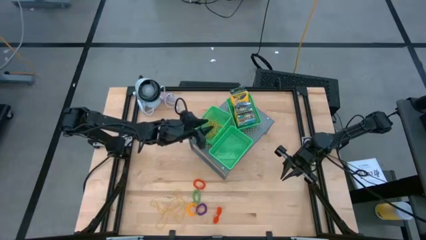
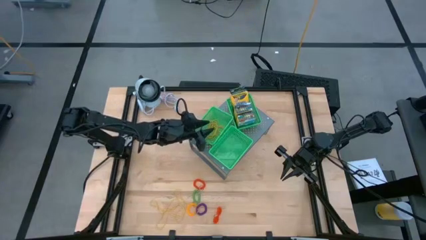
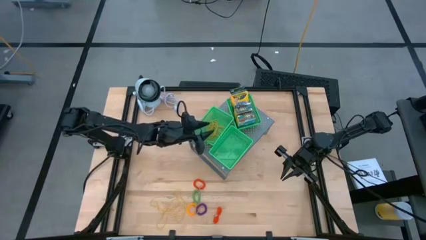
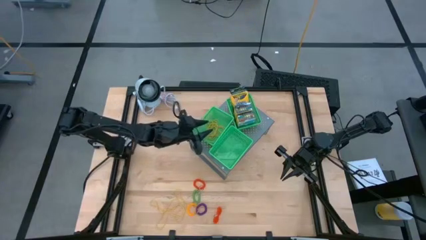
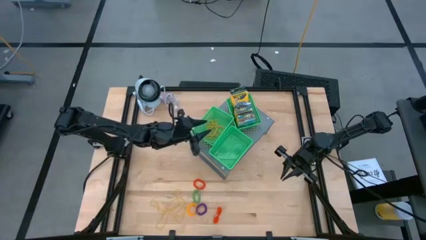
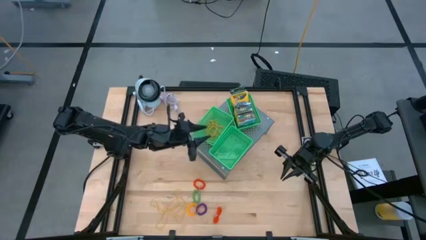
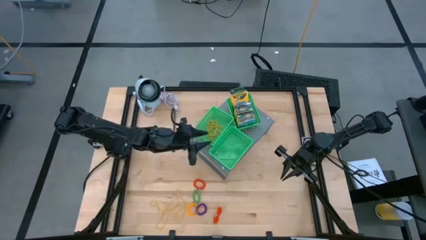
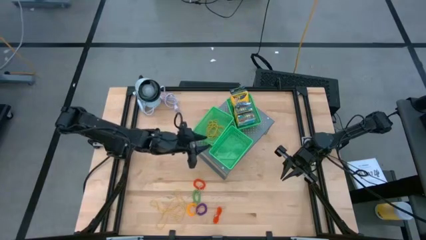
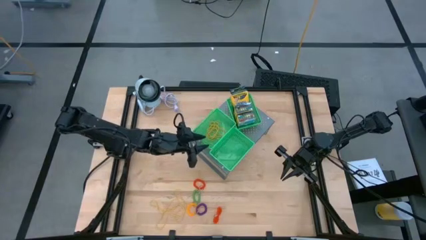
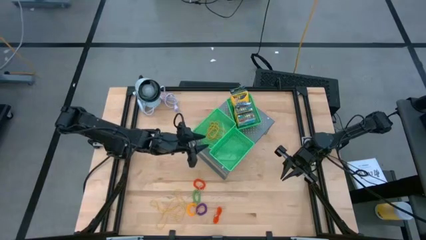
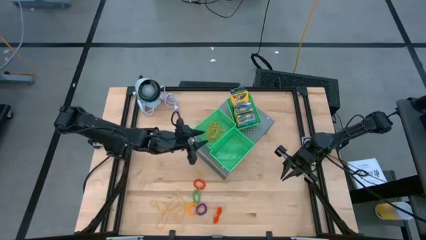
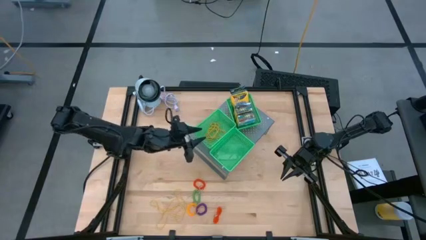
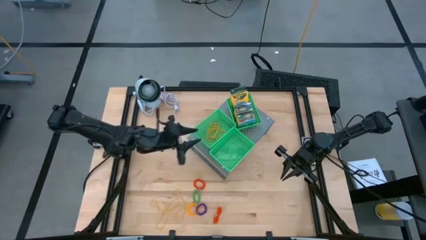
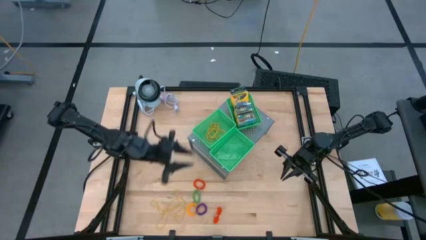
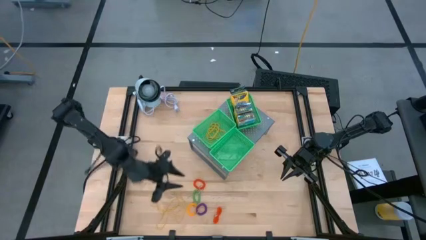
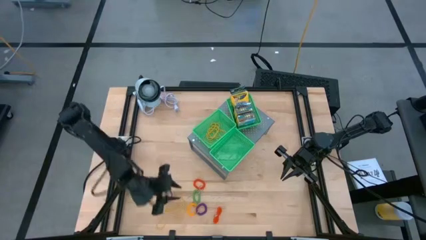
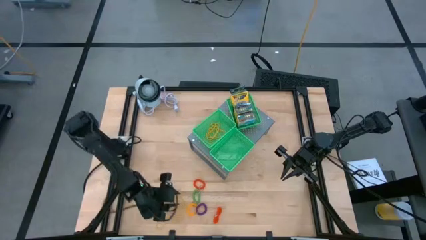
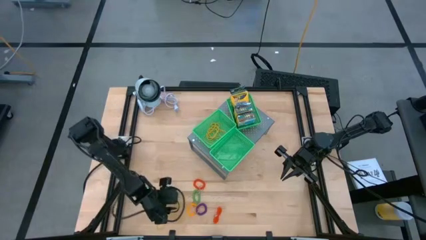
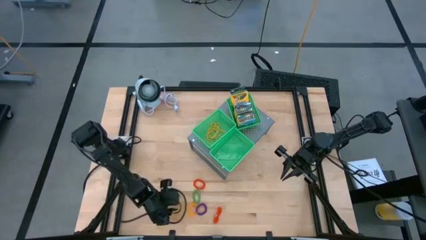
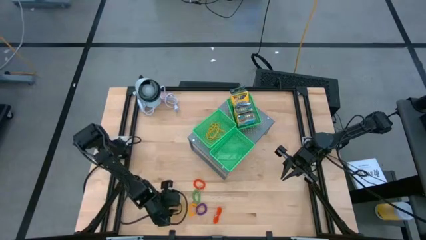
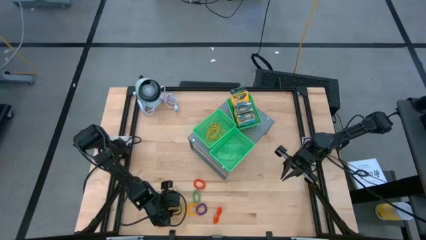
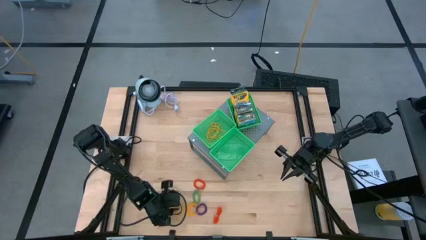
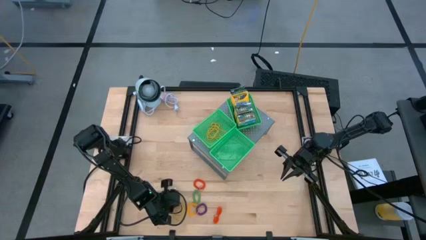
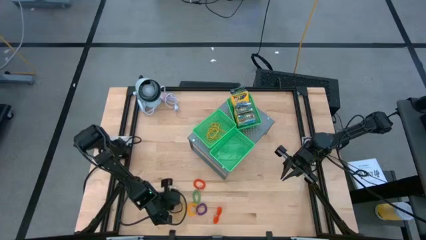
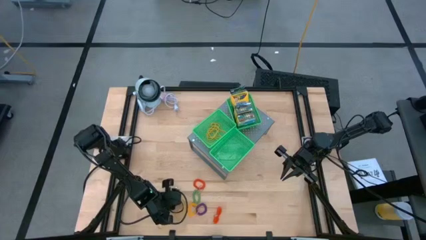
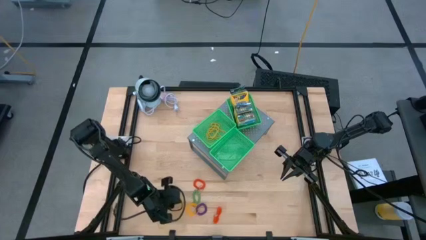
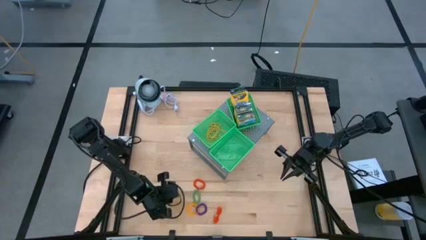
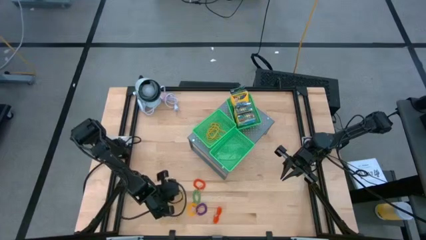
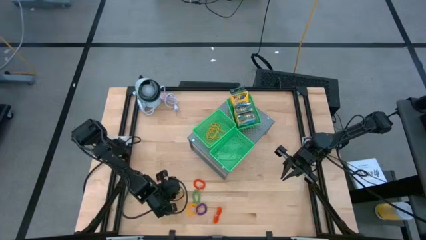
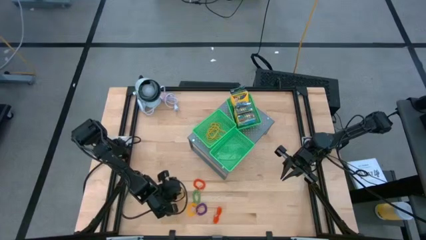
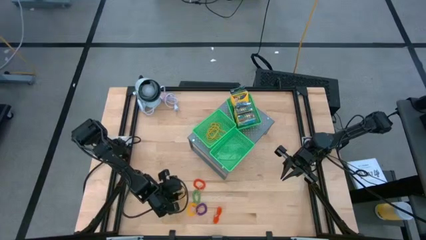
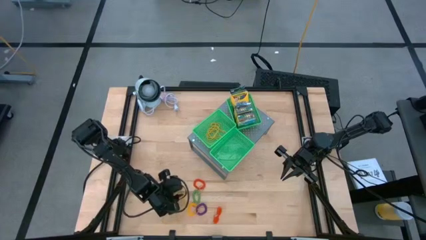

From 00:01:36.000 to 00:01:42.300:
Task: Pick & Place Office Desk Supplies
Put the yellow rubber band into the top left green bin on the shelf

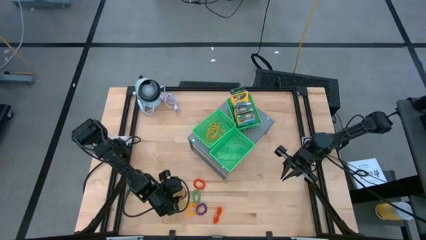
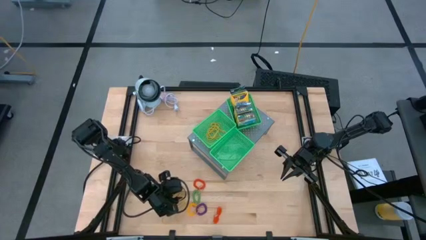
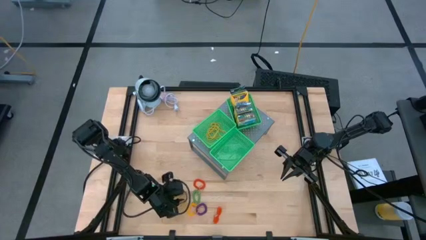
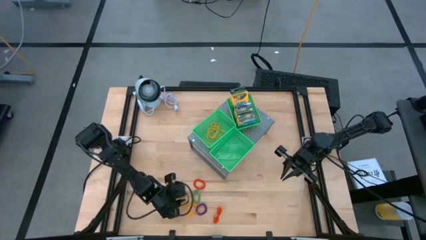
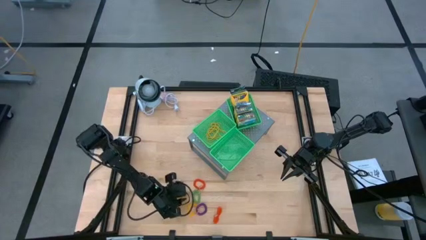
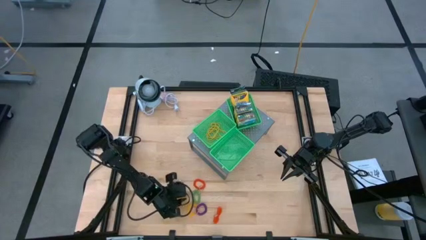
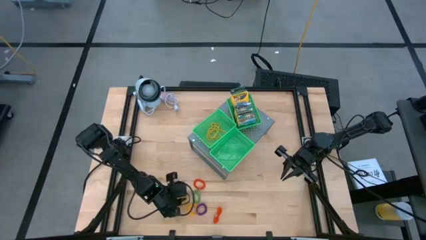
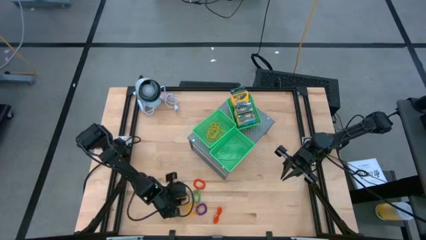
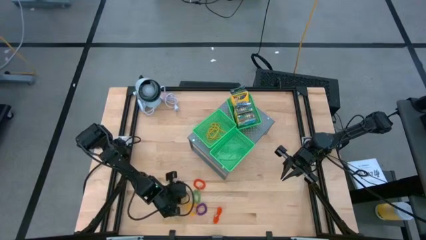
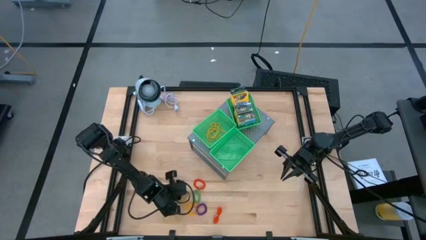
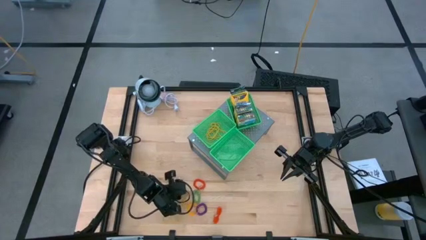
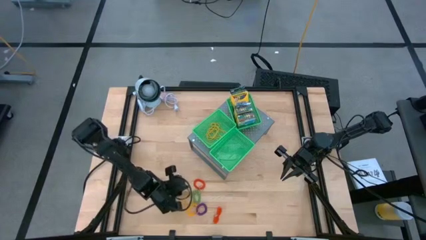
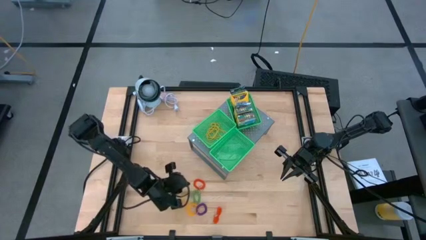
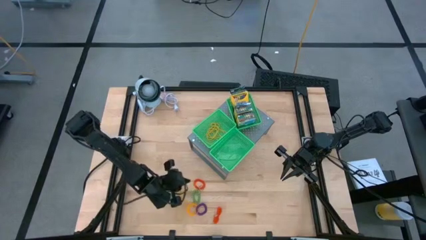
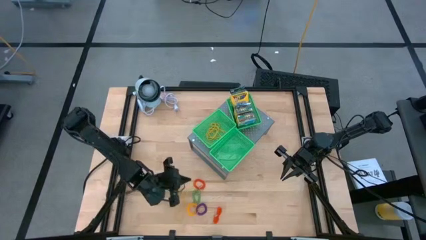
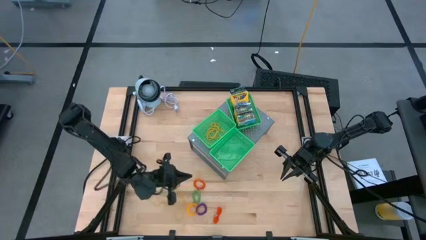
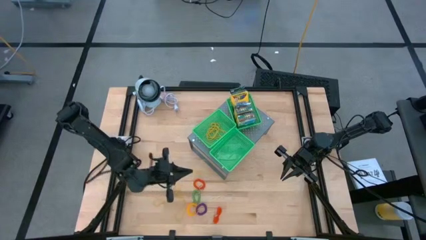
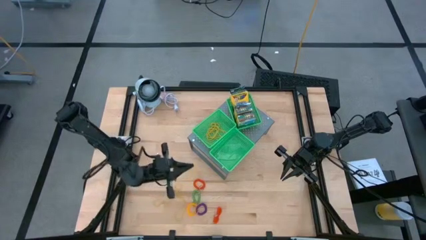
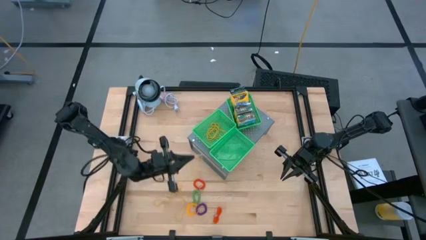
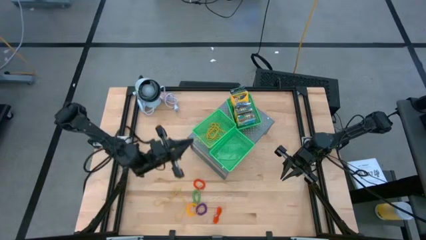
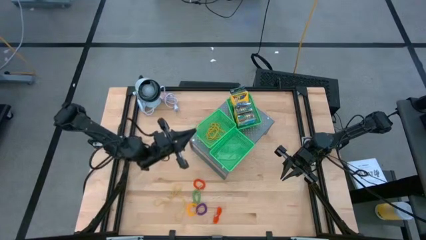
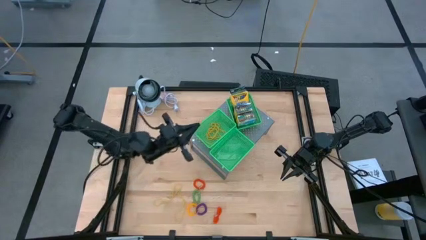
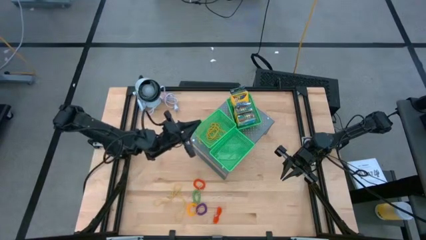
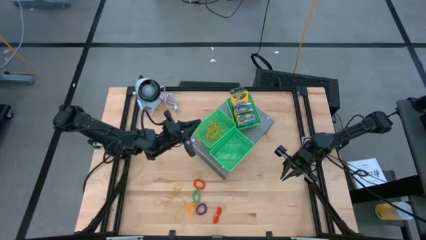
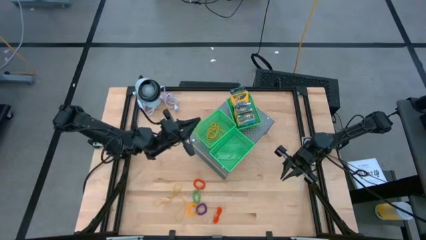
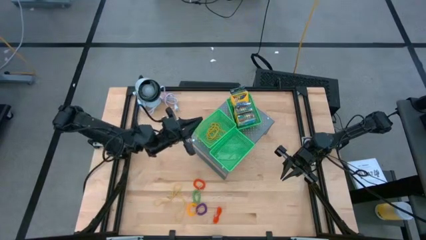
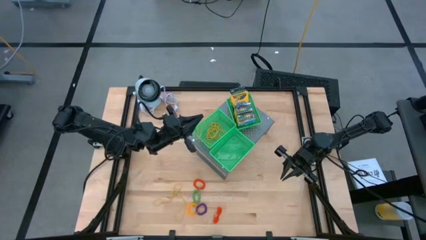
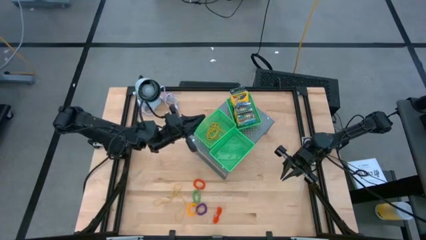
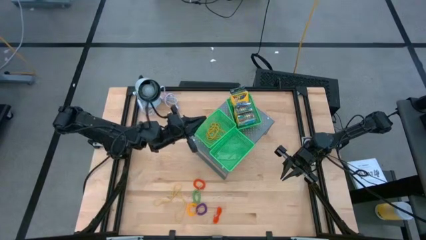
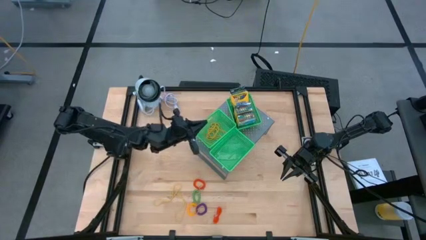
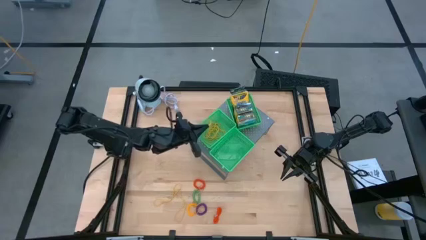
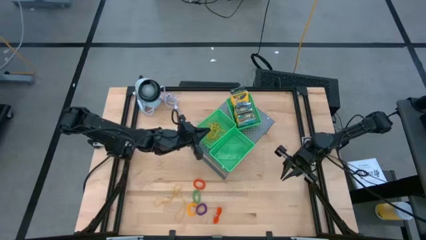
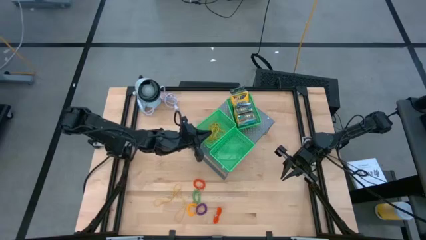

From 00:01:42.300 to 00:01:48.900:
Put the yellow rubber band into the top left green bin on the shelf

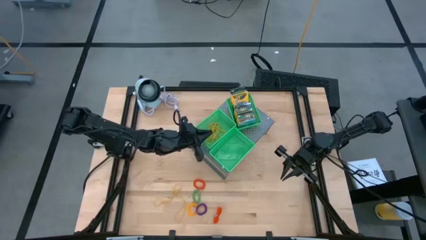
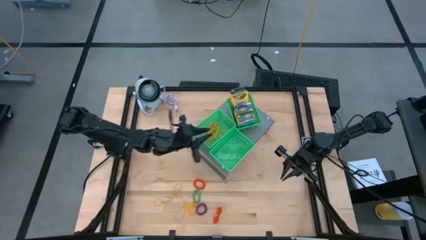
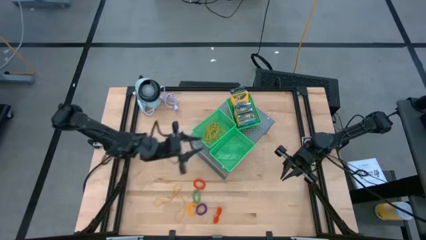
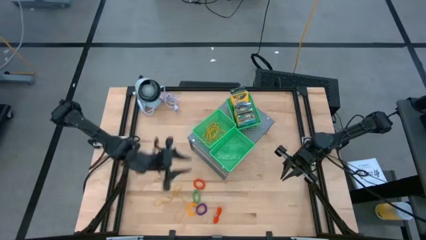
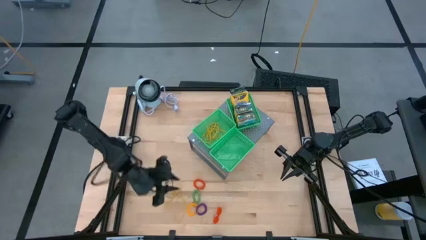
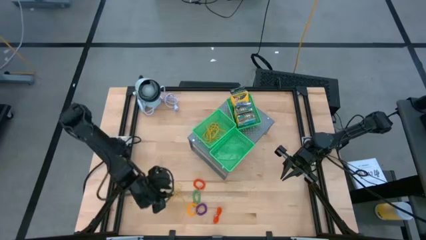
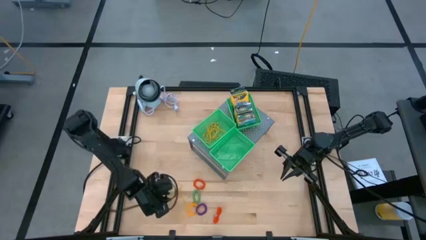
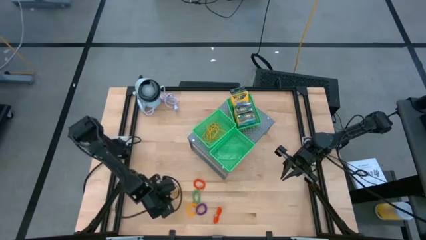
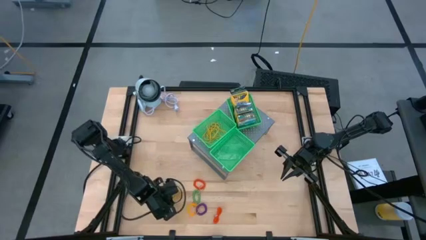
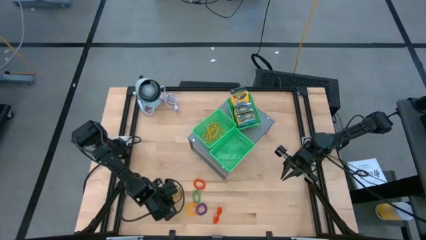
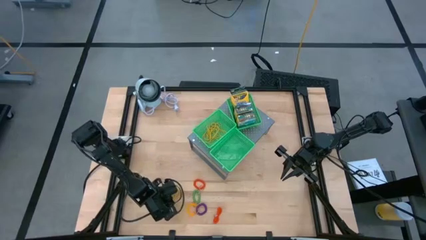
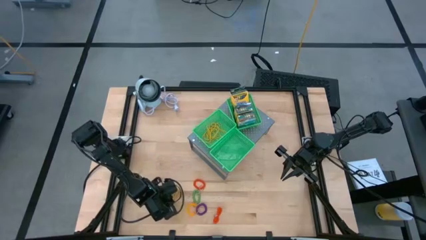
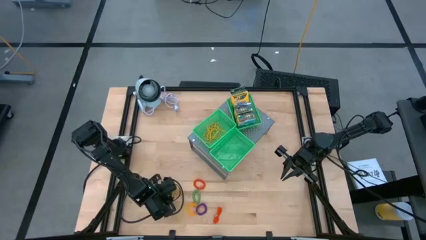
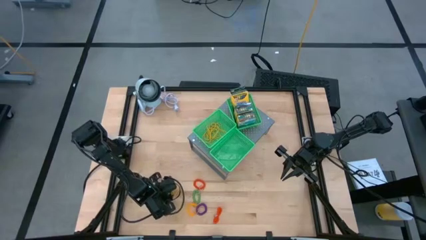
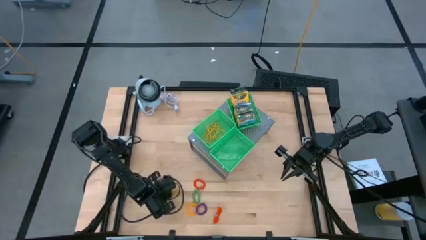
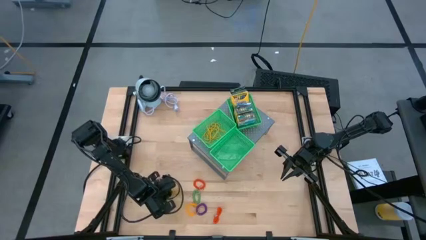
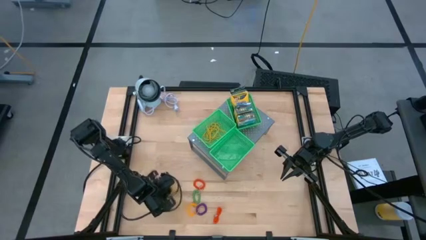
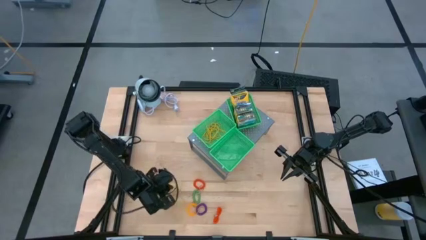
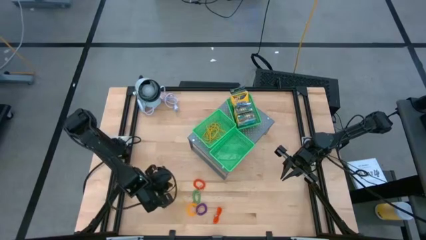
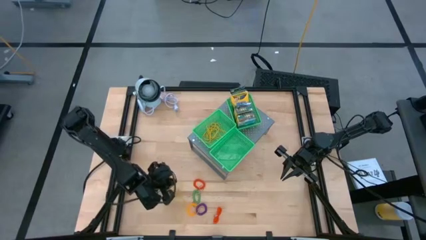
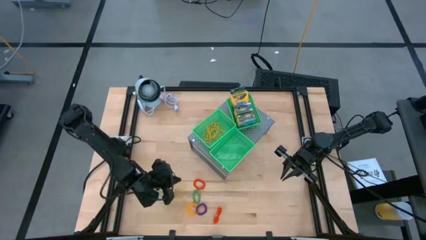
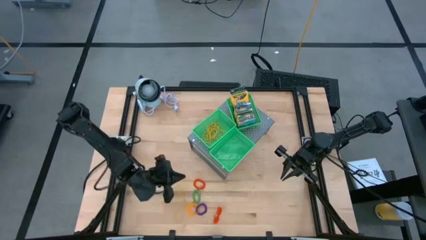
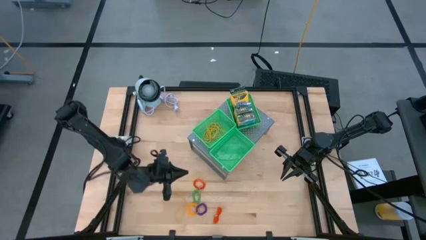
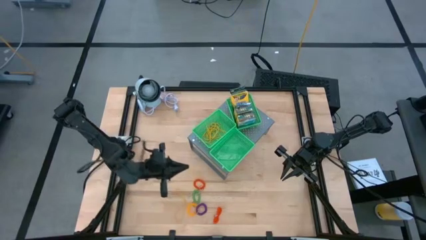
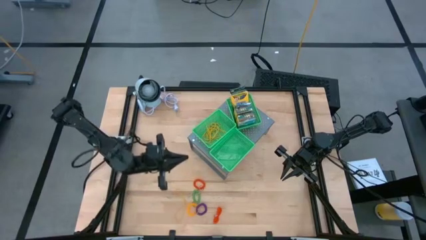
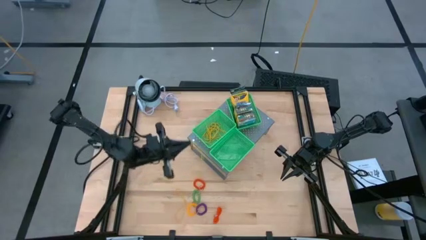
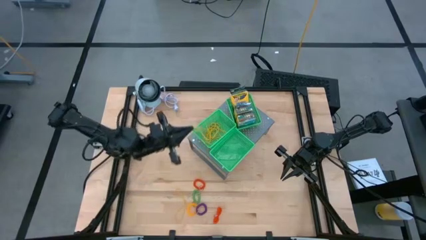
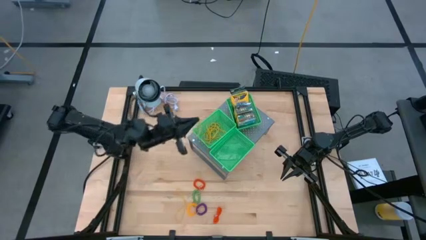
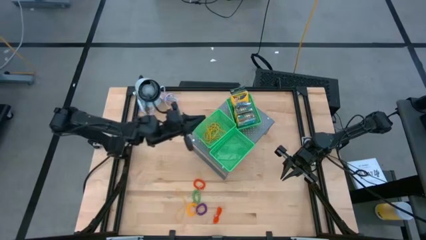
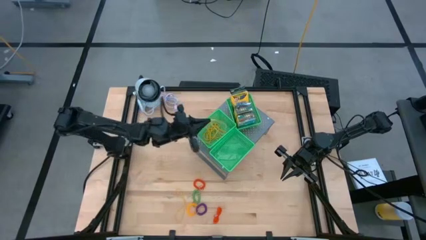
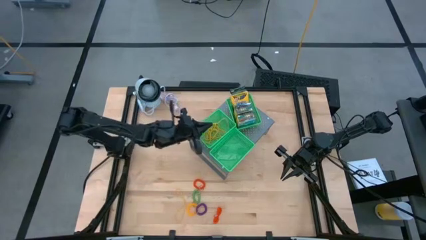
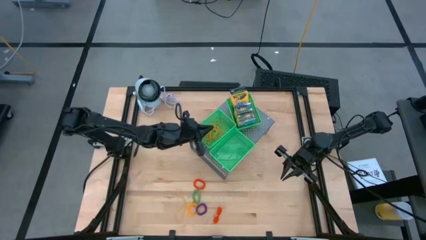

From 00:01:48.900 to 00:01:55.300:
Put the yellow rubber band into the top left green bin on the shelf
